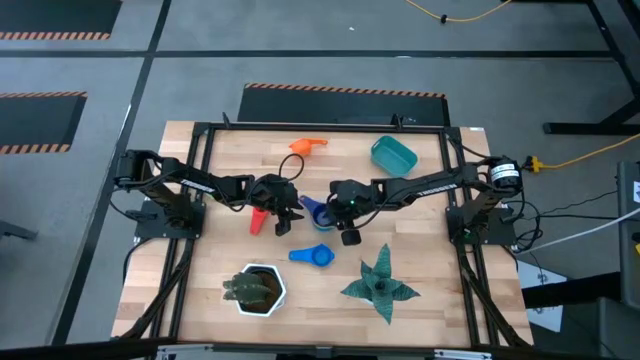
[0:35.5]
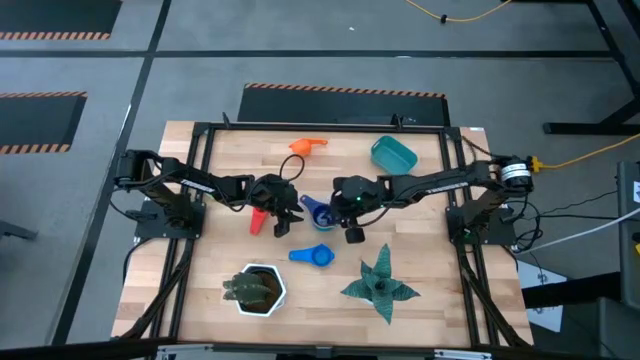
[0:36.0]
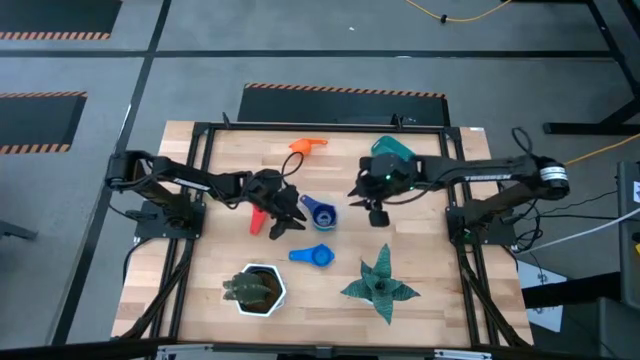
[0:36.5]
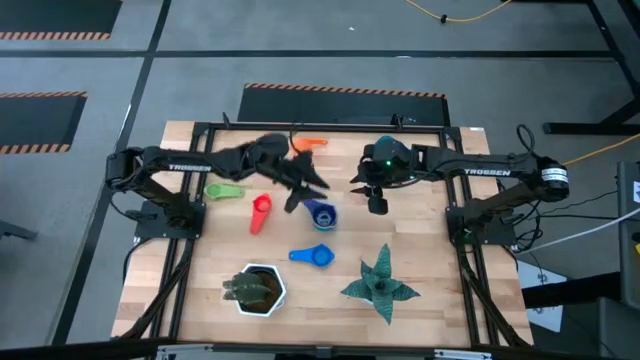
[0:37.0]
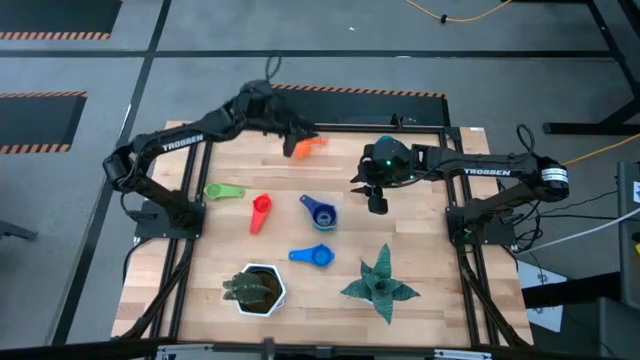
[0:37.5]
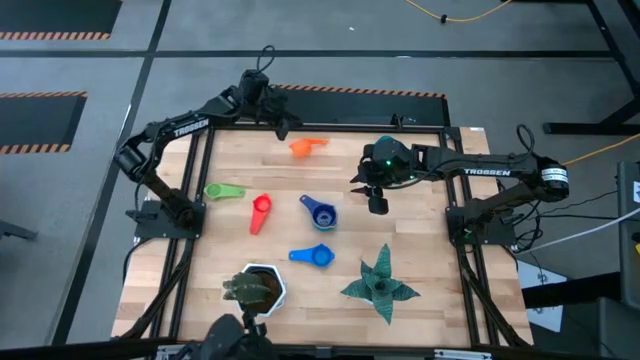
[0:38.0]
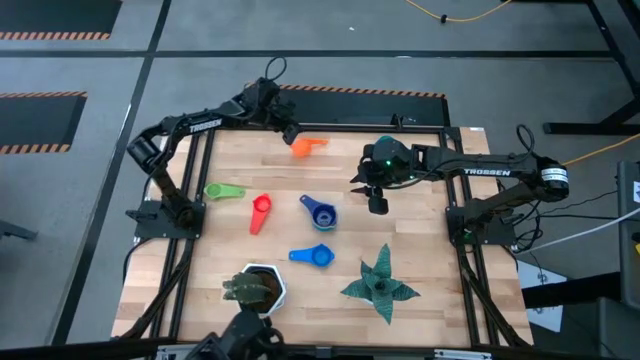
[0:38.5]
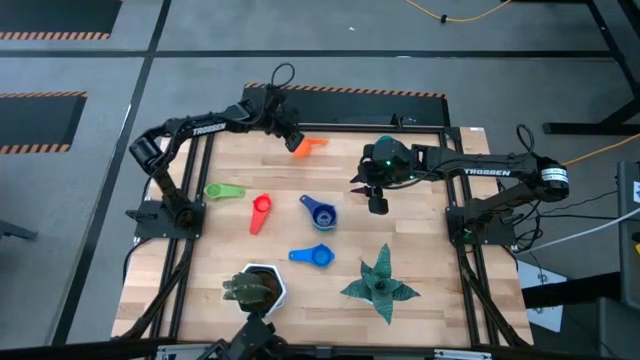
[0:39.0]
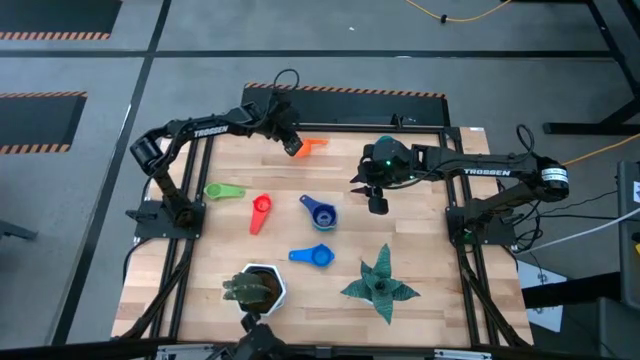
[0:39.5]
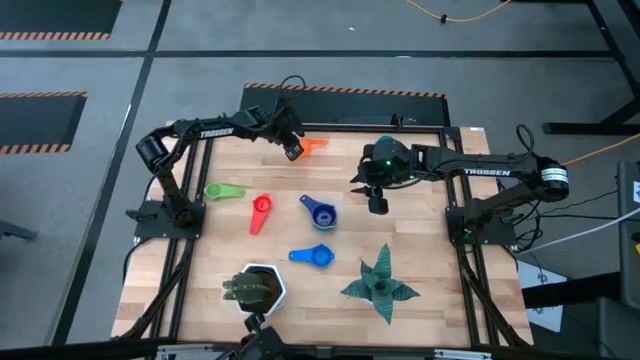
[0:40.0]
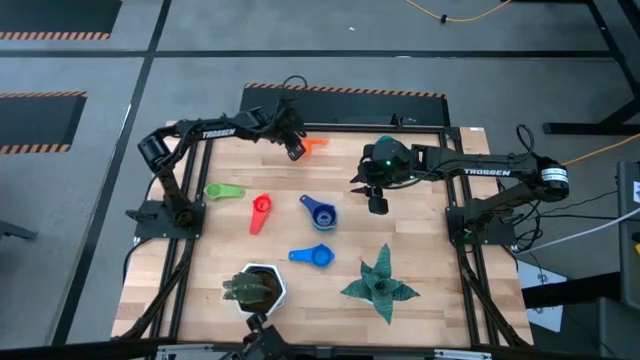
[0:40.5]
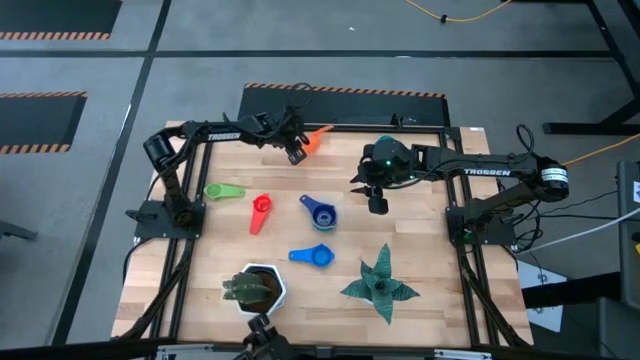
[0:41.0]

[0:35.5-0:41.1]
Task: Nest measuring cups in basket
Stack the orange measuring cup on top of the dark blue measuring cup

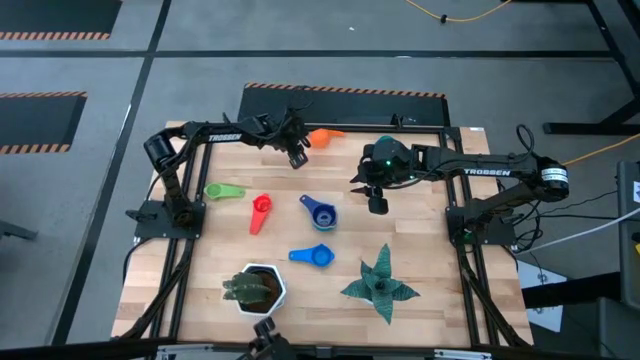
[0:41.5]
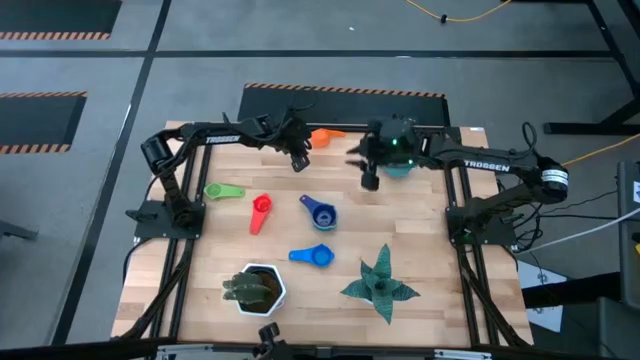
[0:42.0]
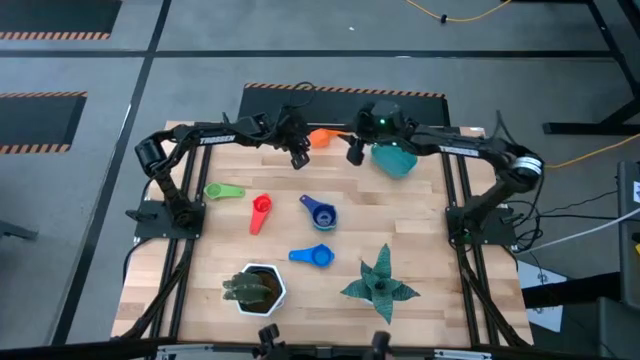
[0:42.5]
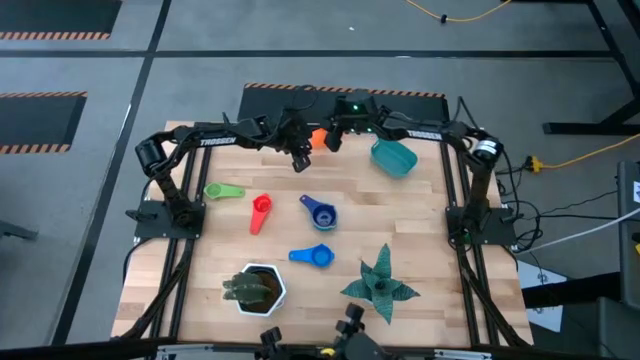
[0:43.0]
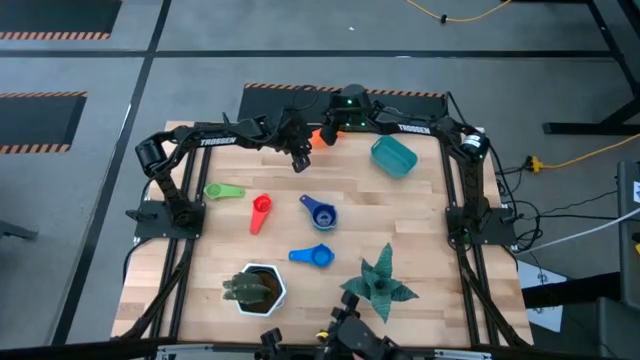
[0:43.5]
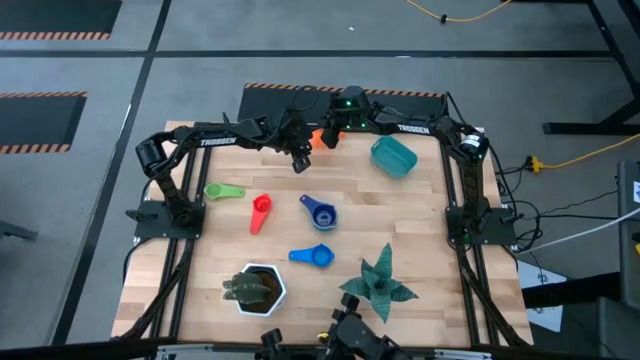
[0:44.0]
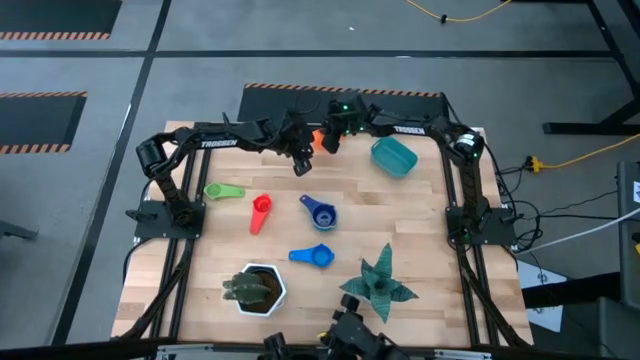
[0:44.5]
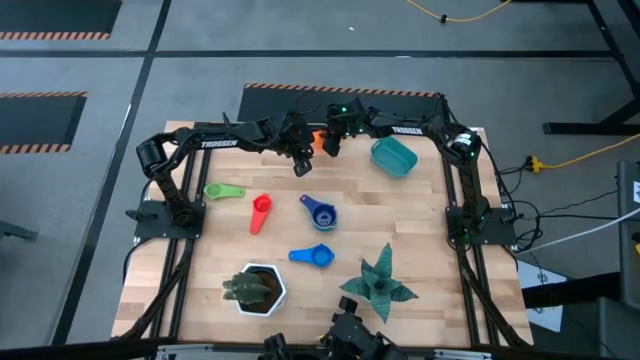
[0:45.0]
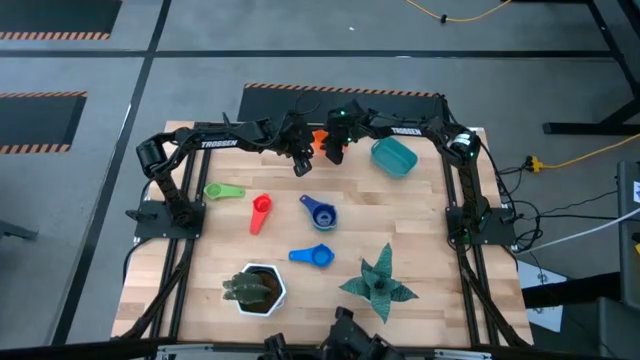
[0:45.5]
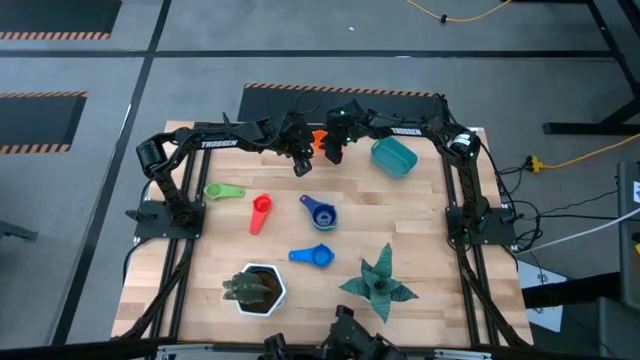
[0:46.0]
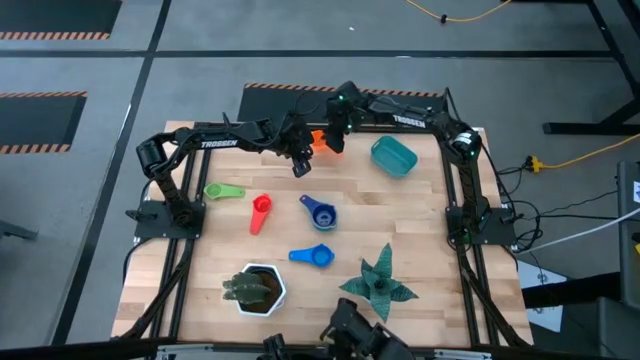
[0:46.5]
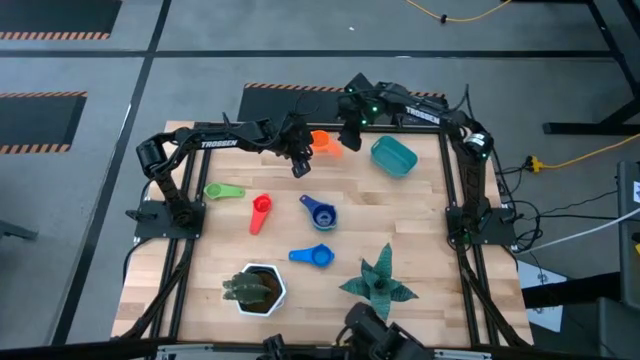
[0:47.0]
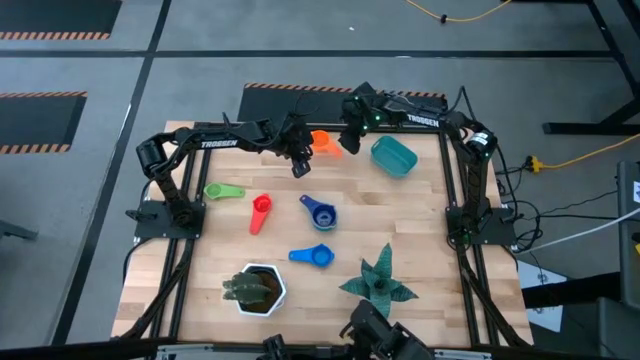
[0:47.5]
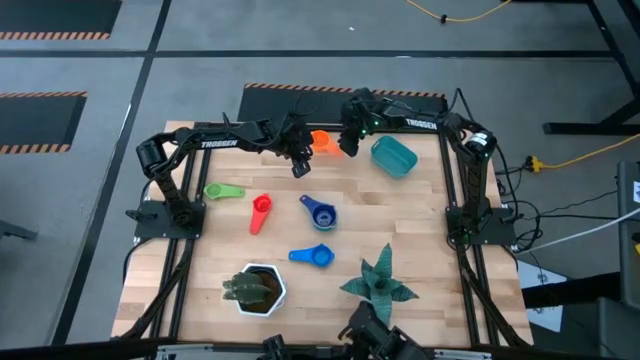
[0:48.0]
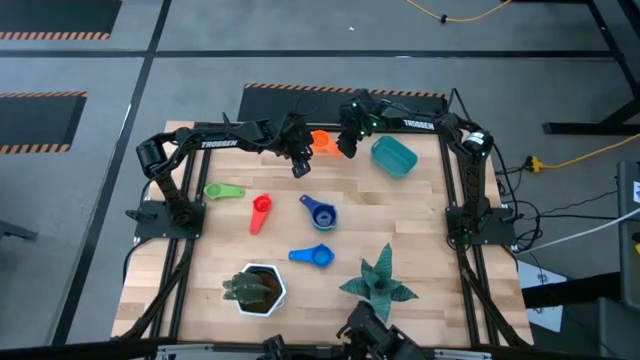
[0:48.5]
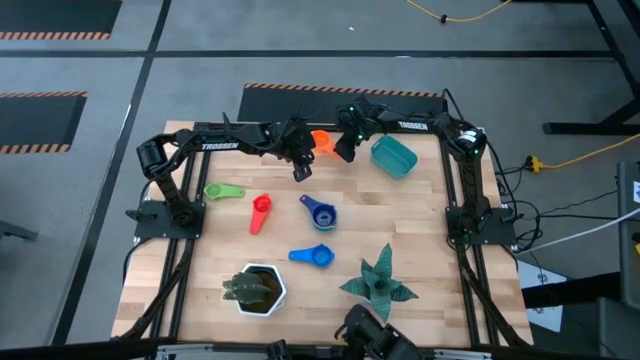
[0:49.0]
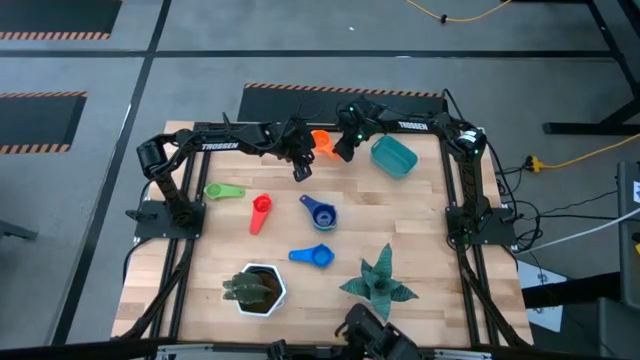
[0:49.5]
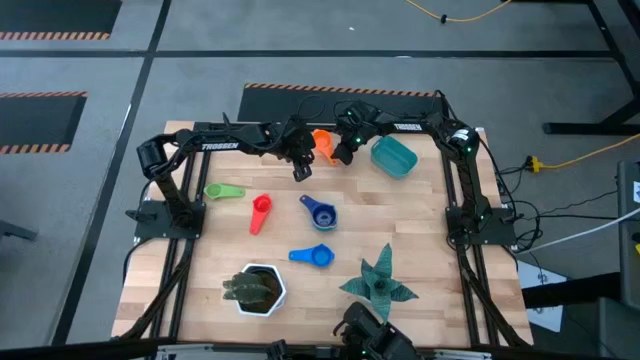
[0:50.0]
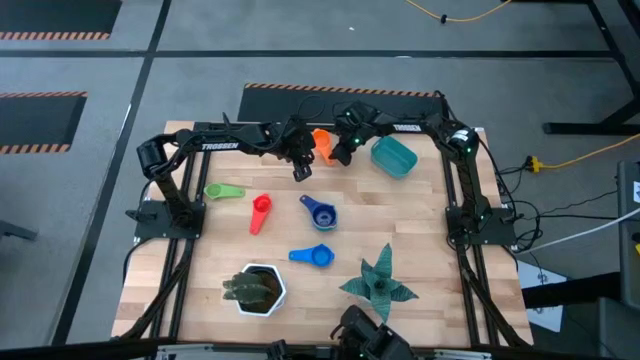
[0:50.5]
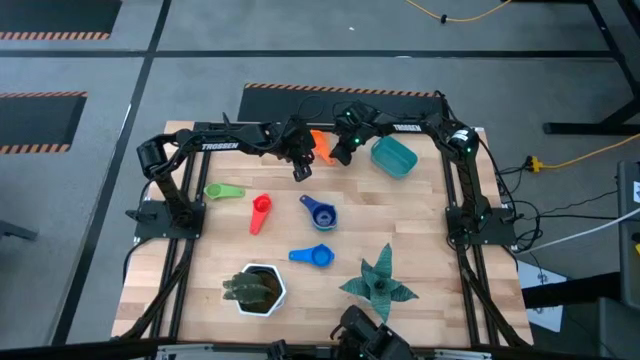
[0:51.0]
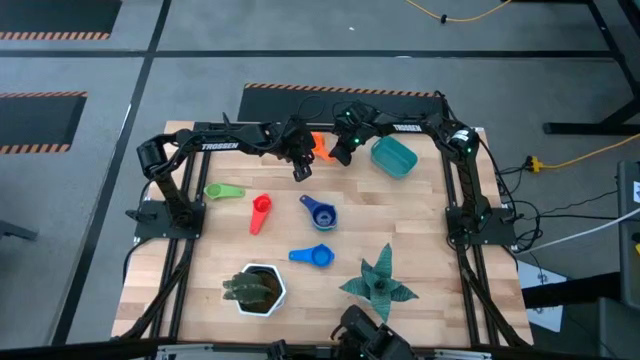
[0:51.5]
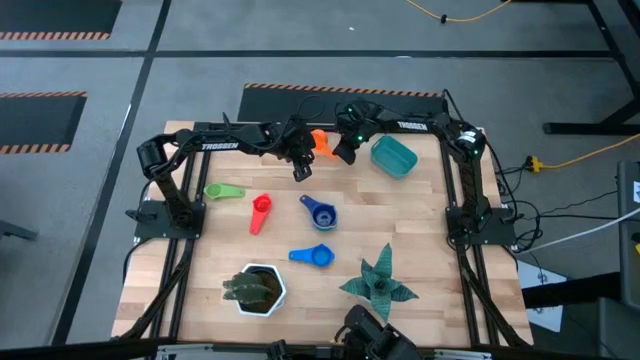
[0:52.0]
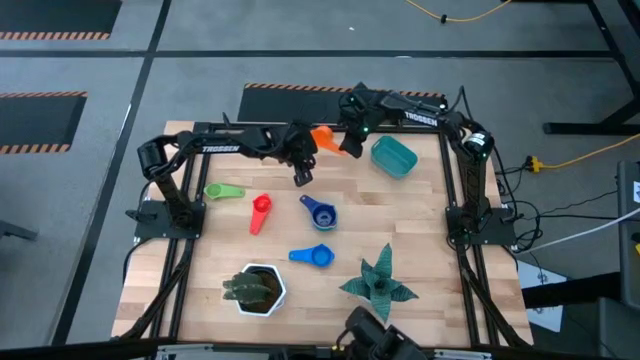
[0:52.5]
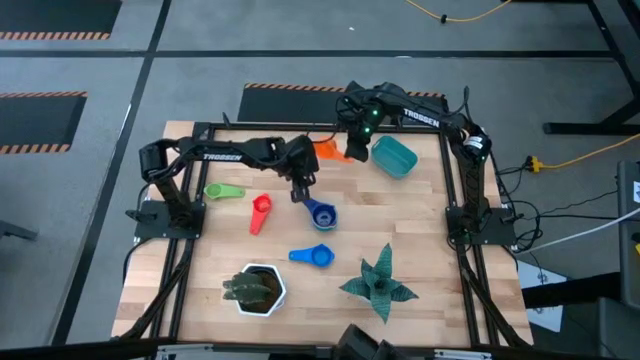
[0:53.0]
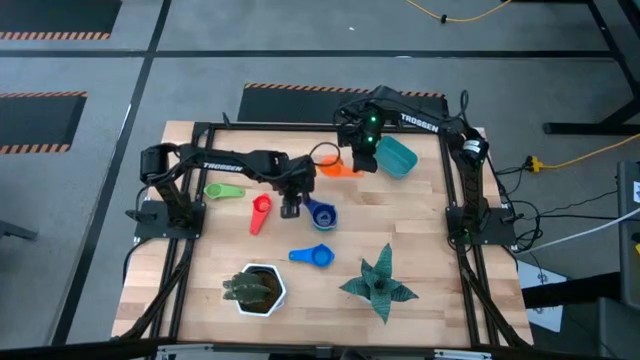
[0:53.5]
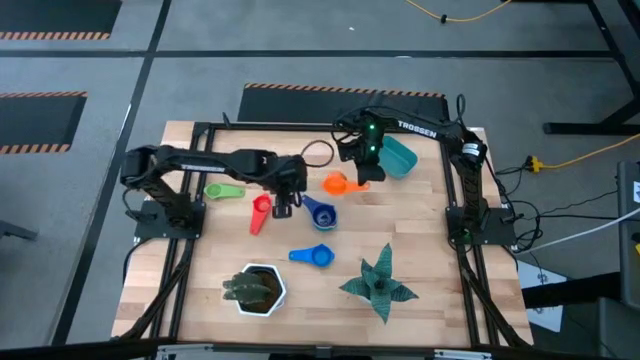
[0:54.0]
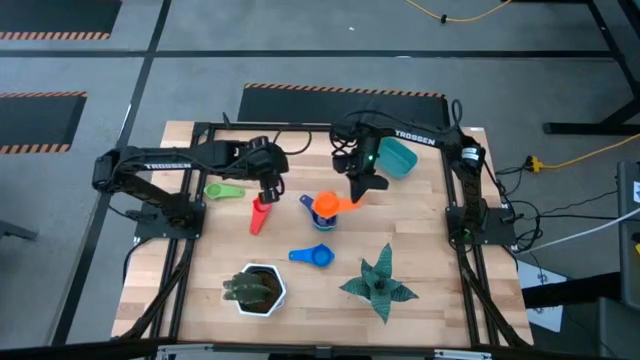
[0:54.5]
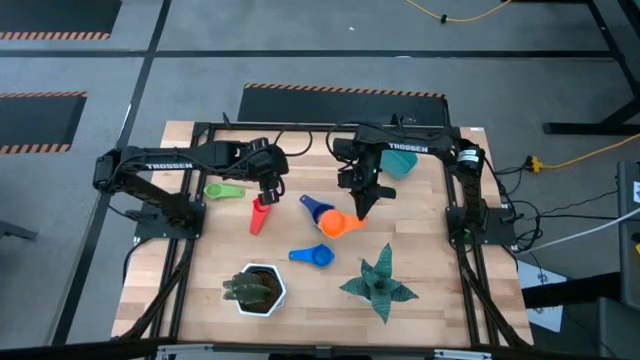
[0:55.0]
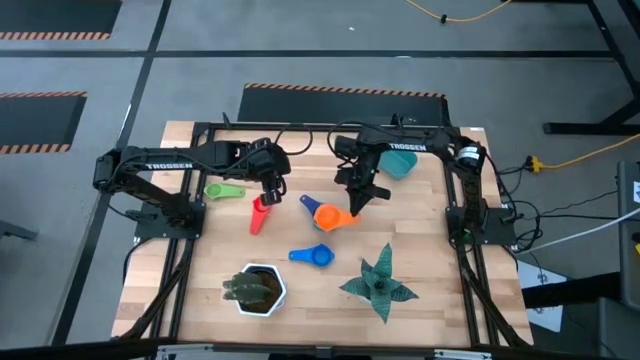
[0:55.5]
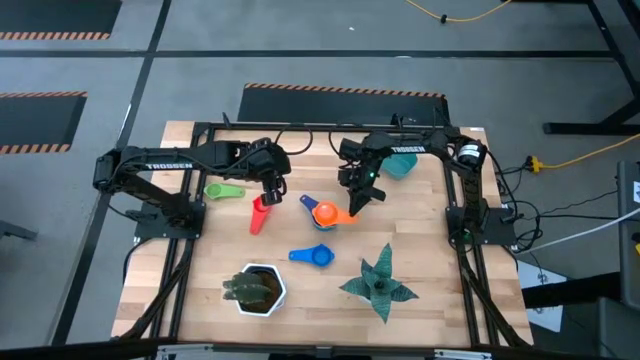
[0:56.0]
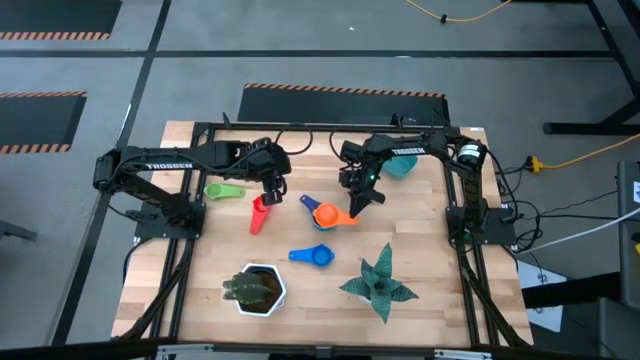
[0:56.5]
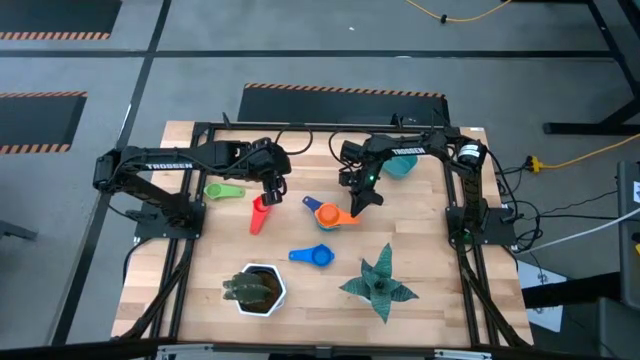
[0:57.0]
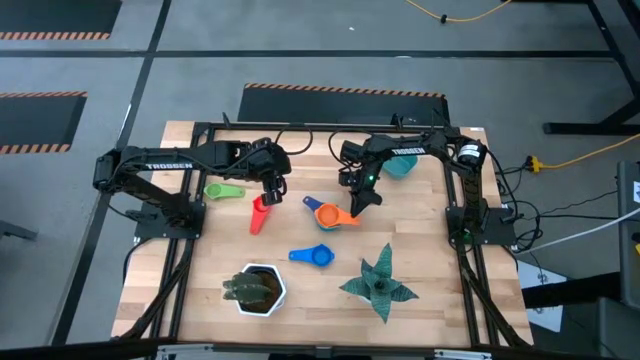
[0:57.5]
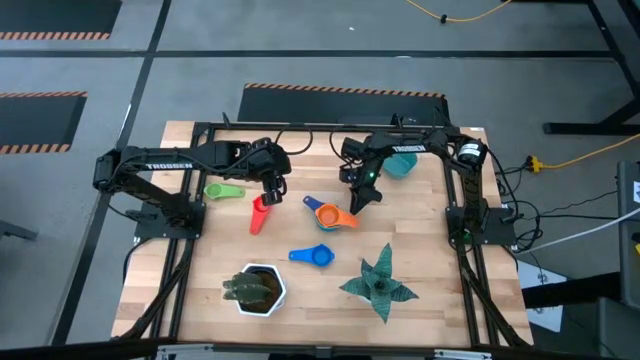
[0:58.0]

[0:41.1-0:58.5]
Stack the orange measuring cup on top of the dark blue measuring cup
